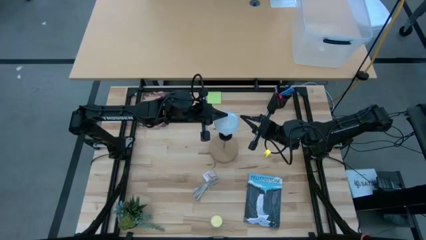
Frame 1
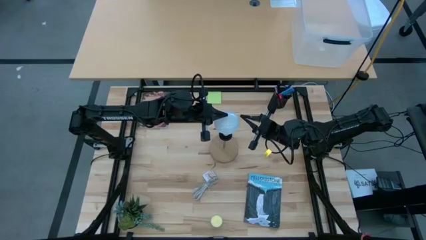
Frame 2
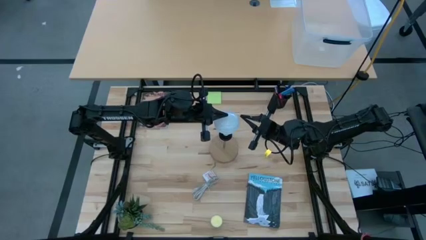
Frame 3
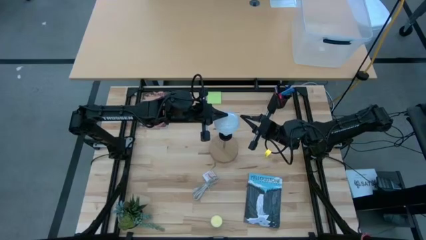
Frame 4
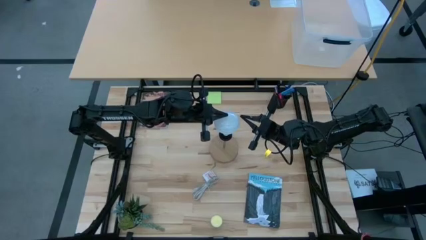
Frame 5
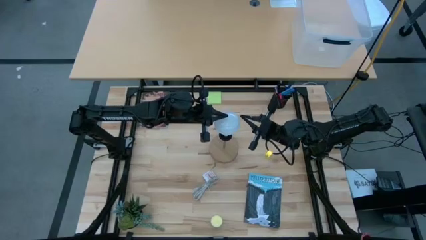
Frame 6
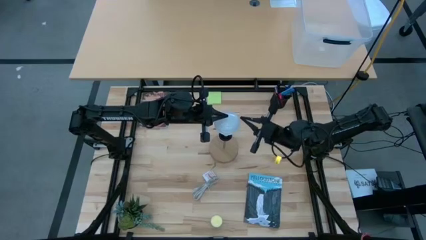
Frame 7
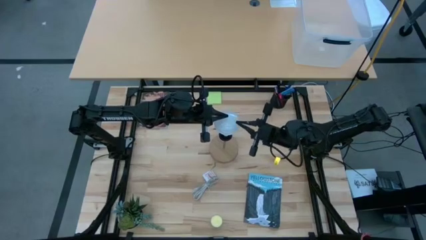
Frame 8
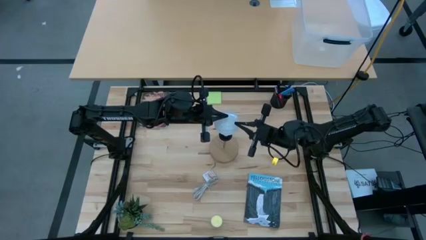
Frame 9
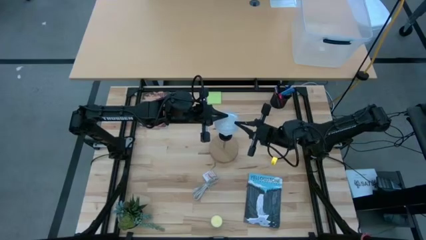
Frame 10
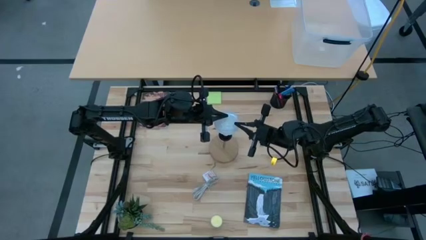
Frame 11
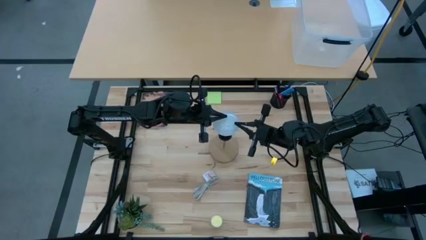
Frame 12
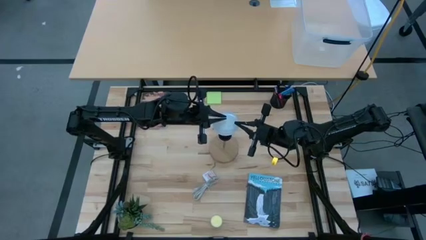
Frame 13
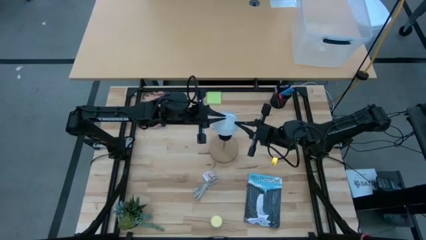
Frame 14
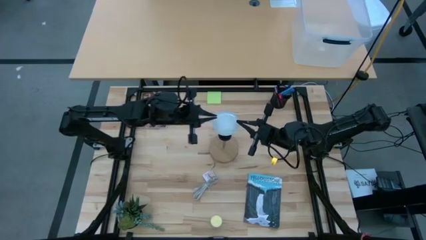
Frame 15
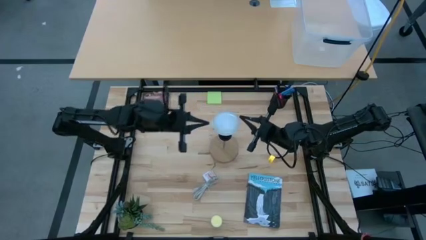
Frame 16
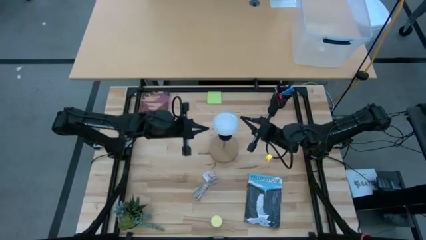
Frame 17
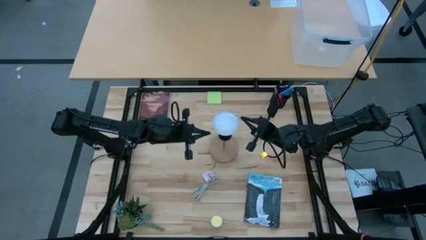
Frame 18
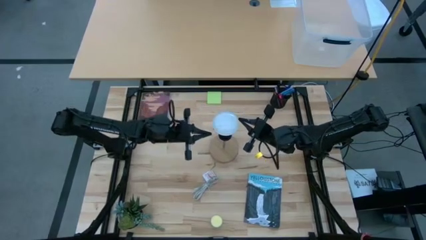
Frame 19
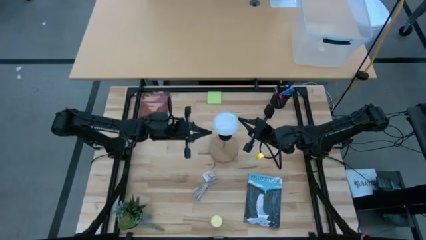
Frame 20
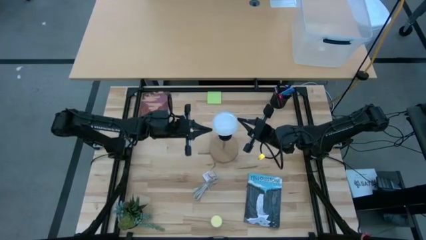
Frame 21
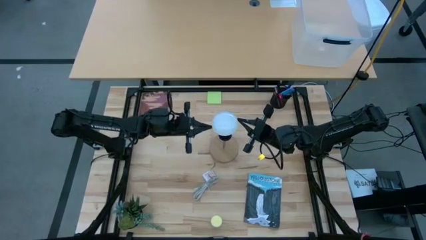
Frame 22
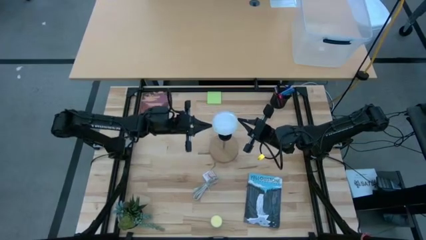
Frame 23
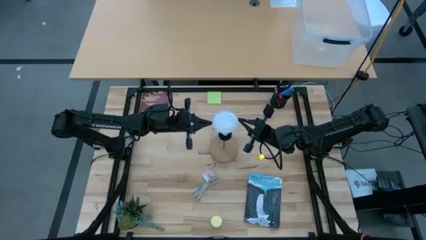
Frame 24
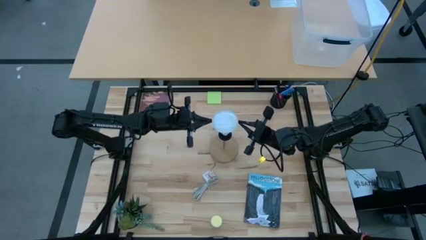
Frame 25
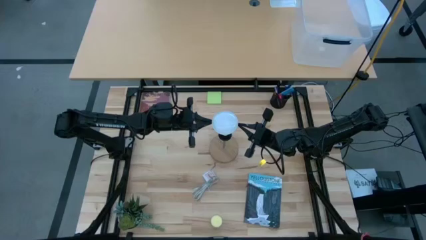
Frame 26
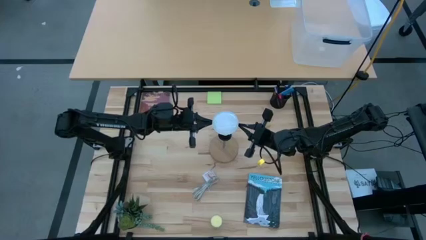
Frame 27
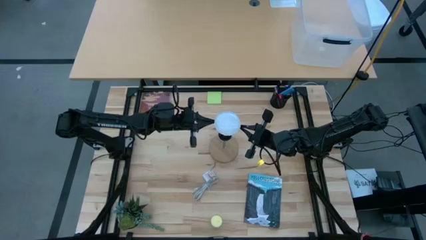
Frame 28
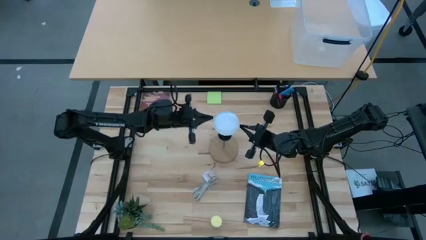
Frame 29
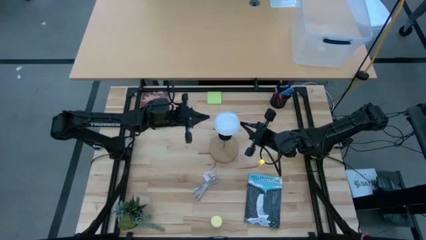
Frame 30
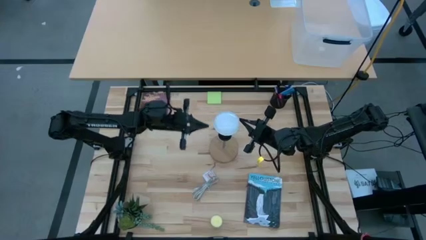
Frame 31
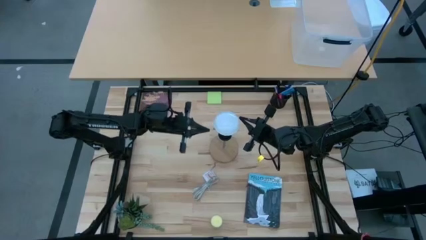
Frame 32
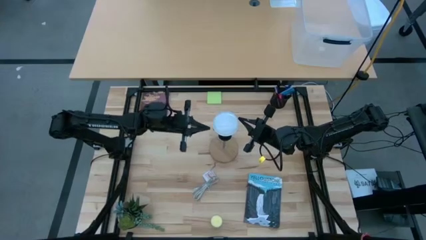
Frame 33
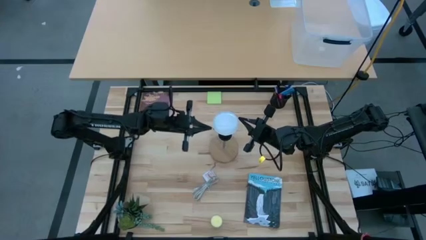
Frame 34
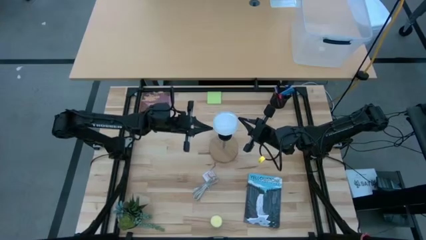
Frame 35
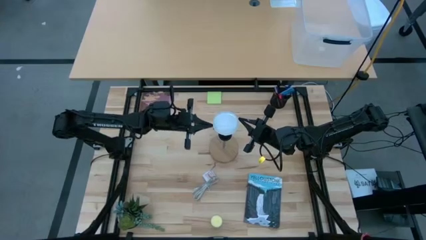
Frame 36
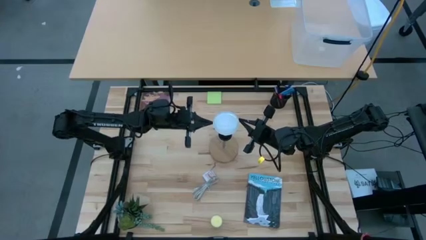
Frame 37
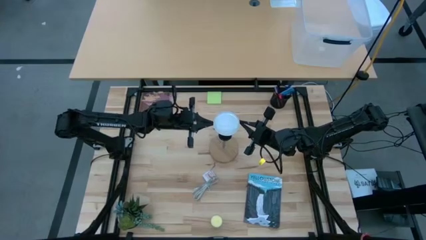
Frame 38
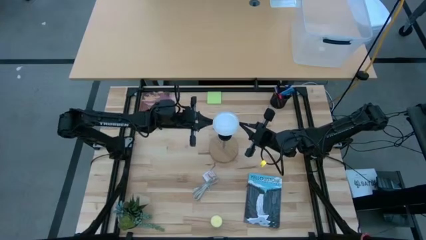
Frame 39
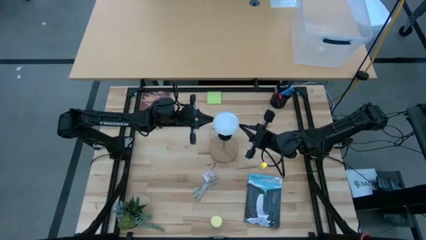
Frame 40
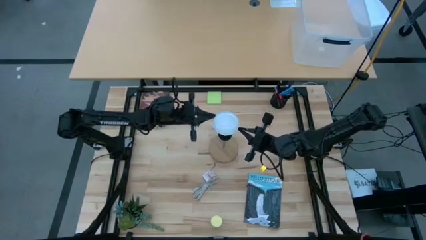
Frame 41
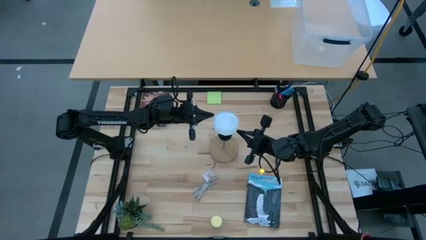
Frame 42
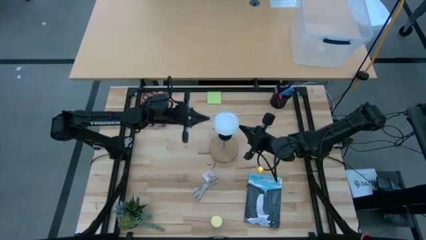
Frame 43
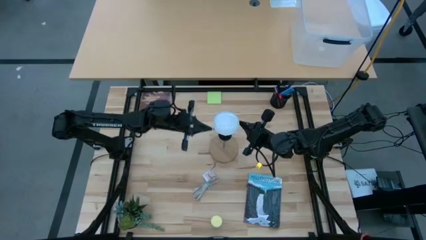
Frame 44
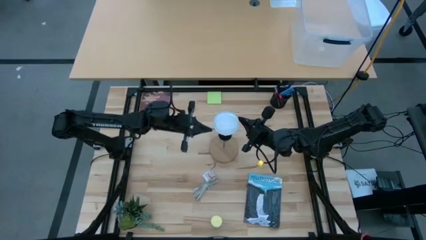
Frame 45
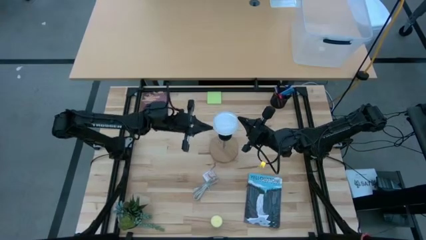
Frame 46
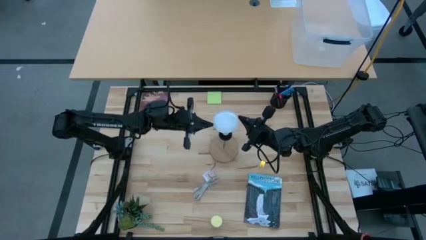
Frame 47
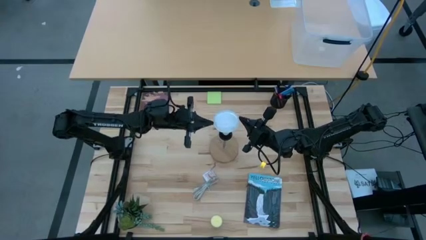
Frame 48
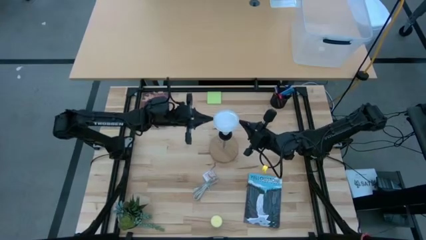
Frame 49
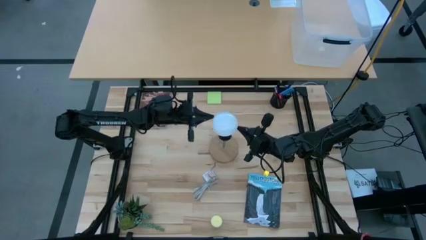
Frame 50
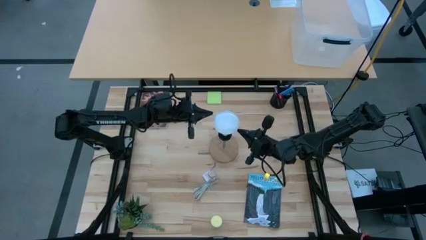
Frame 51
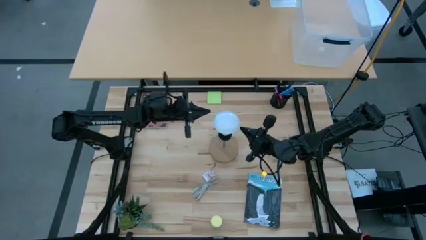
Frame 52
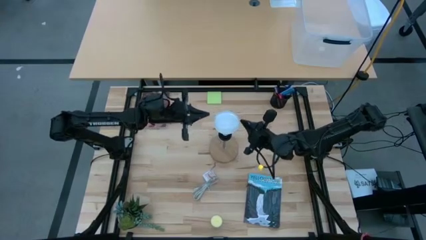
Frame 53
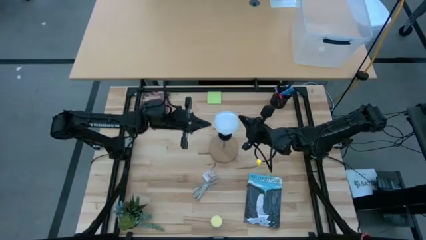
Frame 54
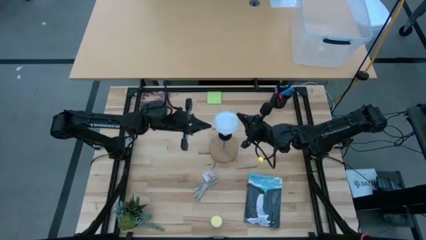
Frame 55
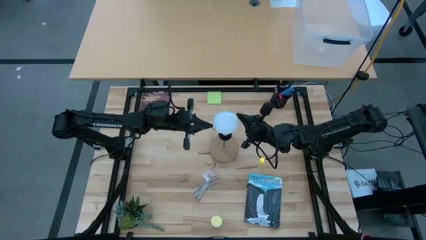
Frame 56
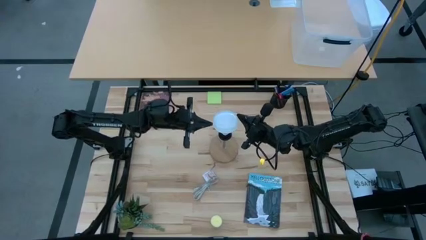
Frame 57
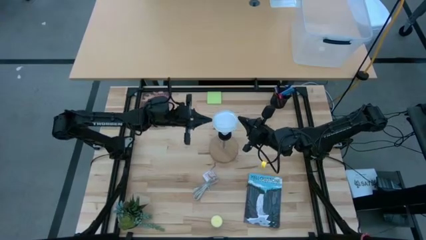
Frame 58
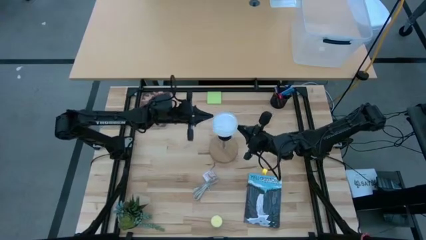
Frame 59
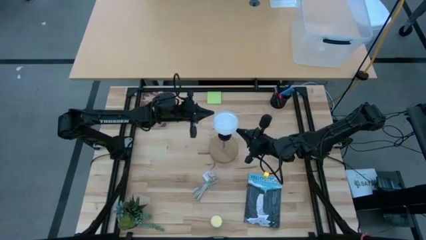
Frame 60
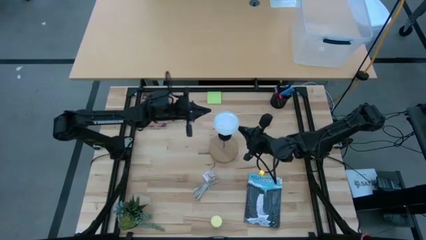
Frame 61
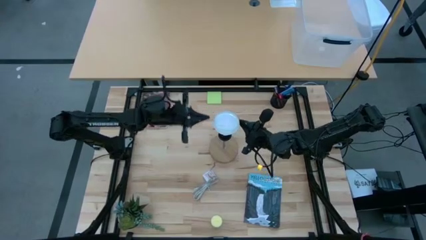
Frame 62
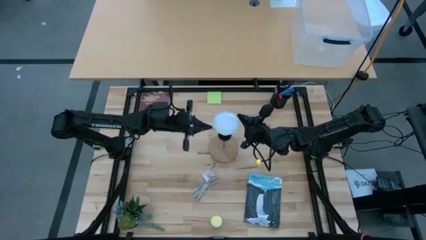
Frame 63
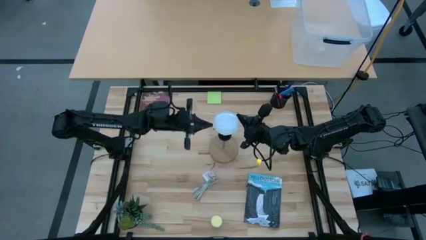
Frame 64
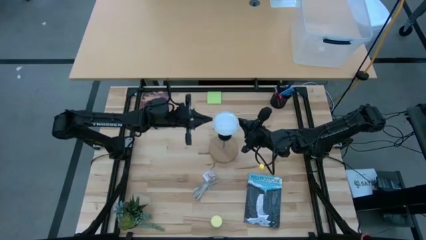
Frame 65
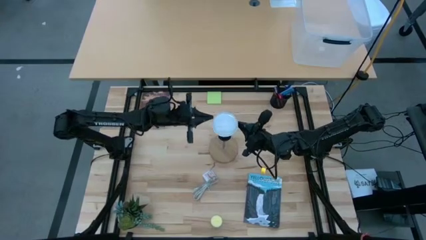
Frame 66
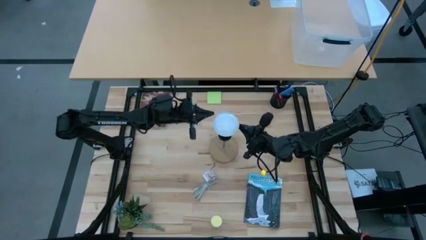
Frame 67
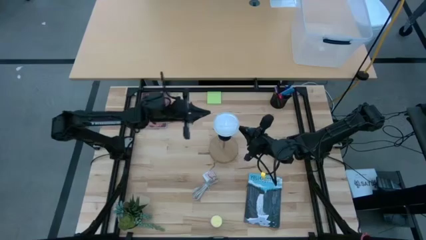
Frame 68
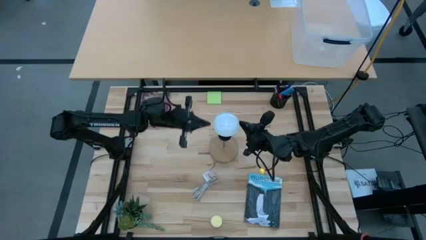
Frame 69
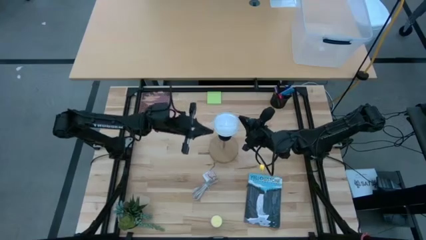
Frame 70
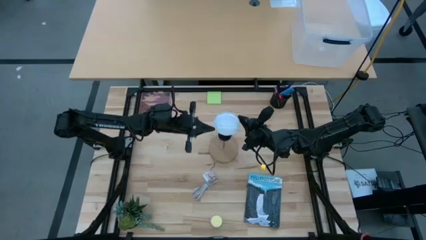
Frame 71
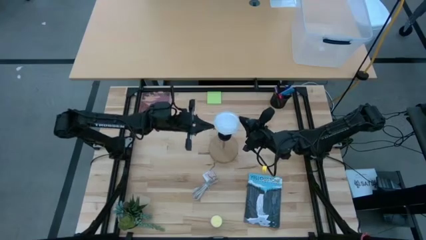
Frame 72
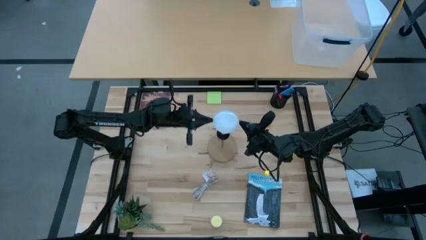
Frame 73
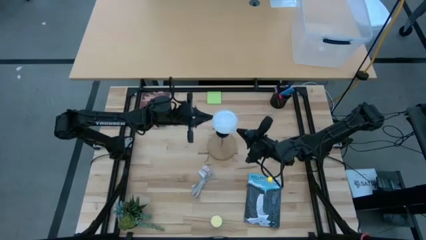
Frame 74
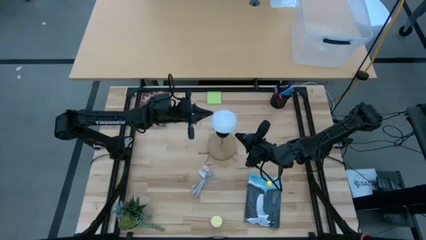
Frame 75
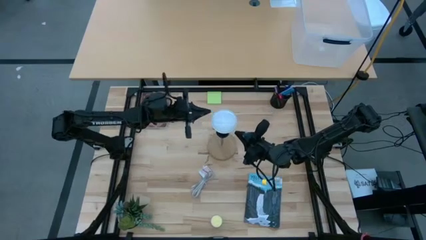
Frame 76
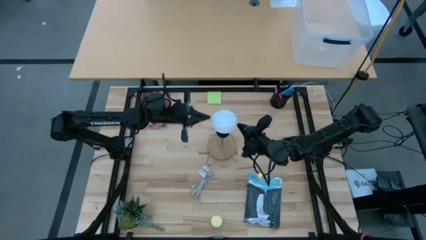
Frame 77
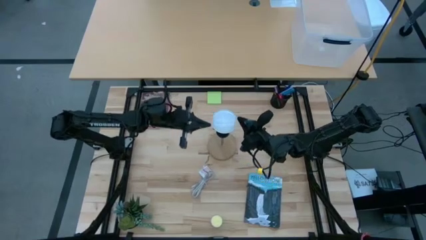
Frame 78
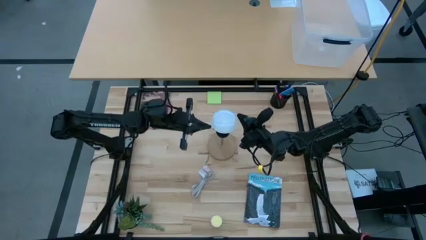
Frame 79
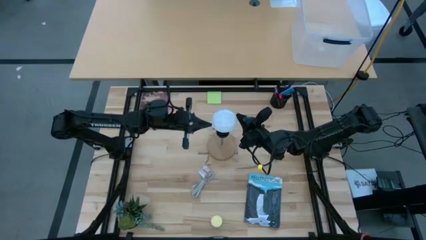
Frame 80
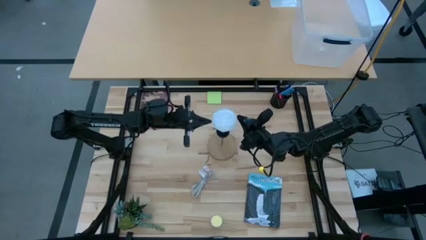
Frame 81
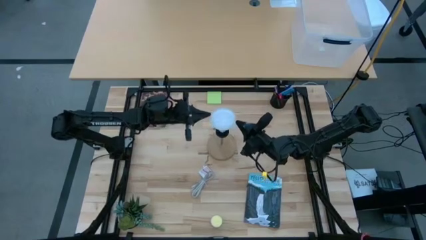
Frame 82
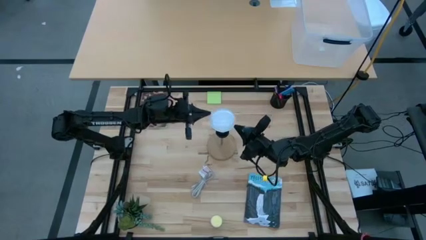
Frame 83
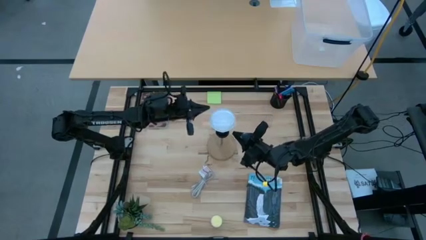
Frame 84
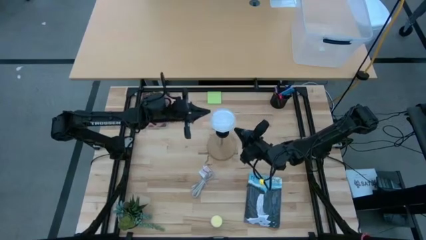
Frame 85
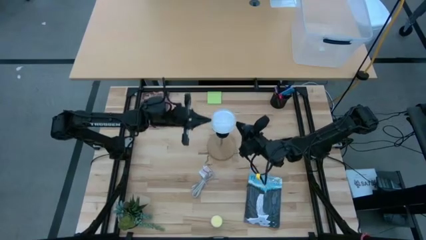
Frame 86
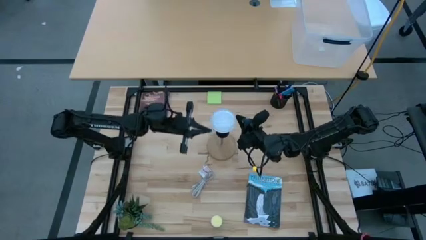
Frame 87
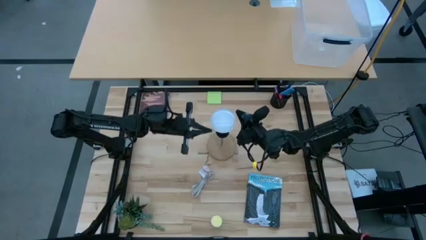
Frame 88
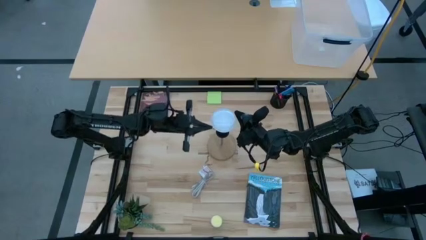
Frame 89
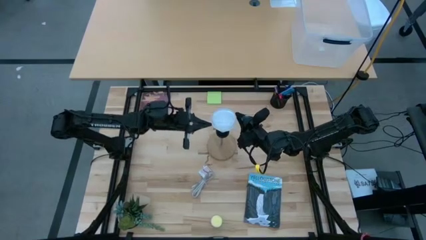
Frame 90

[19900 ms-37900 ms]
Task: Screw lightbulb
Insert the lightbulb into the lamp
